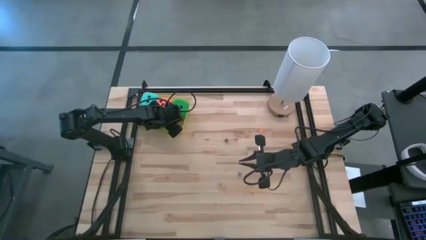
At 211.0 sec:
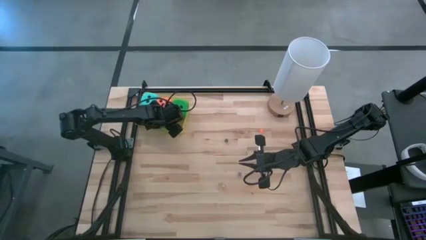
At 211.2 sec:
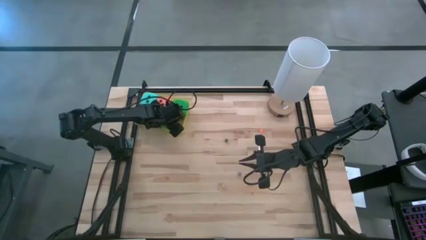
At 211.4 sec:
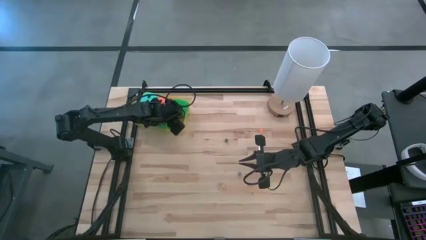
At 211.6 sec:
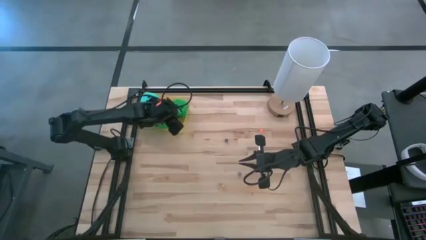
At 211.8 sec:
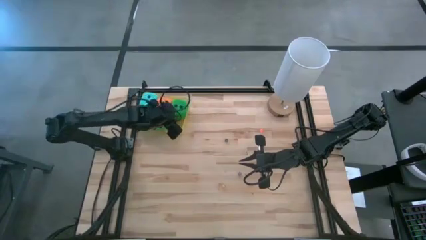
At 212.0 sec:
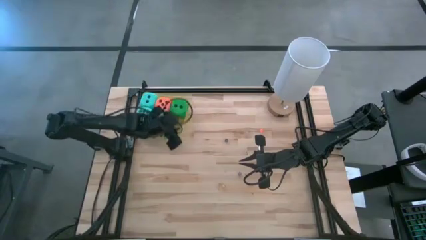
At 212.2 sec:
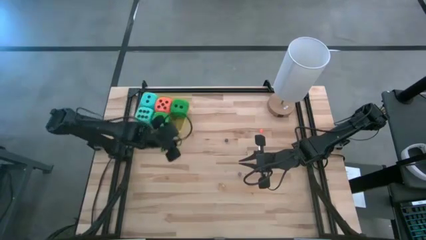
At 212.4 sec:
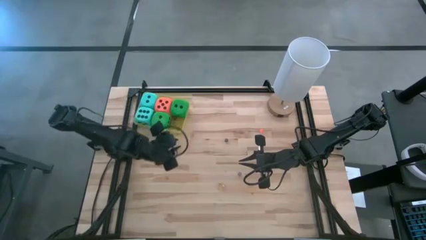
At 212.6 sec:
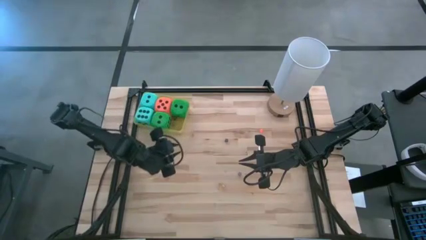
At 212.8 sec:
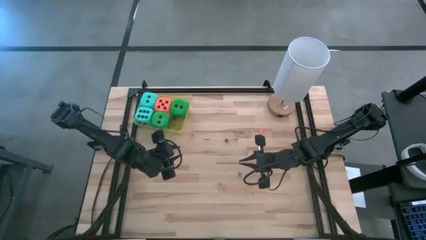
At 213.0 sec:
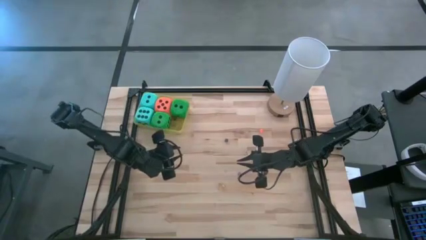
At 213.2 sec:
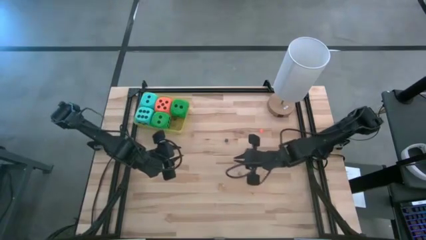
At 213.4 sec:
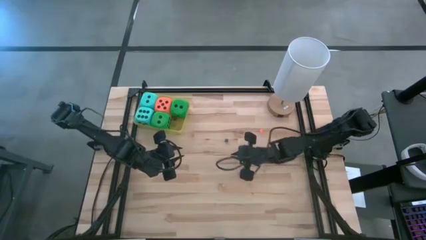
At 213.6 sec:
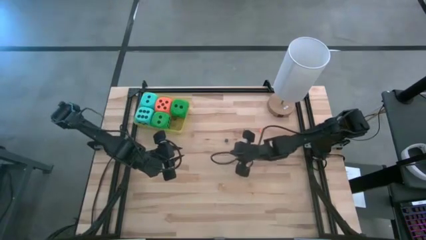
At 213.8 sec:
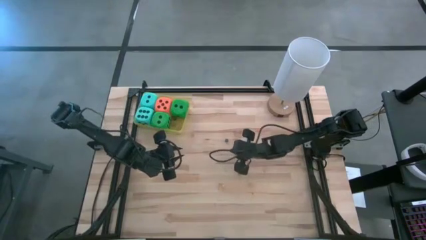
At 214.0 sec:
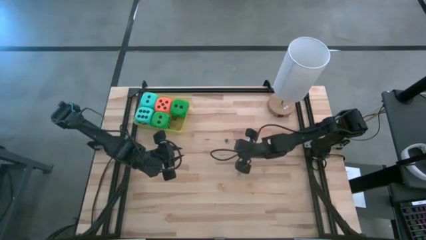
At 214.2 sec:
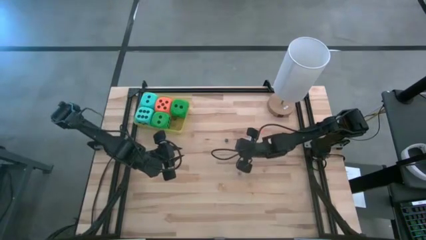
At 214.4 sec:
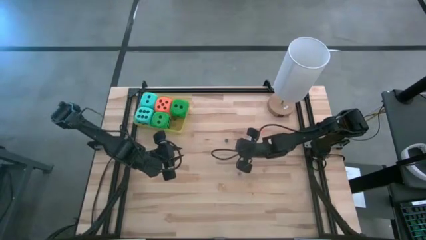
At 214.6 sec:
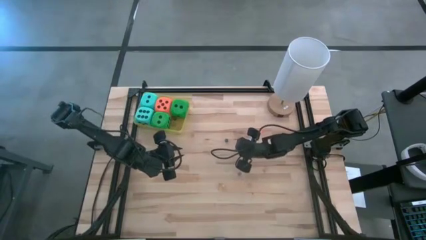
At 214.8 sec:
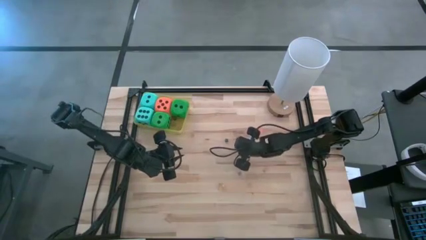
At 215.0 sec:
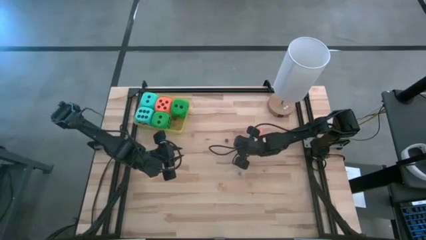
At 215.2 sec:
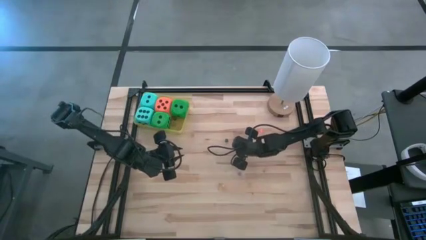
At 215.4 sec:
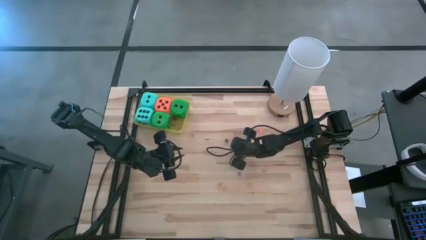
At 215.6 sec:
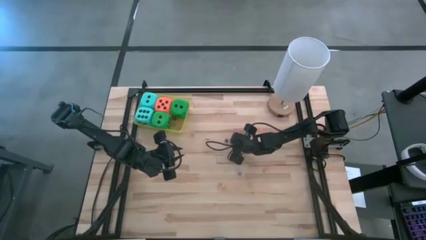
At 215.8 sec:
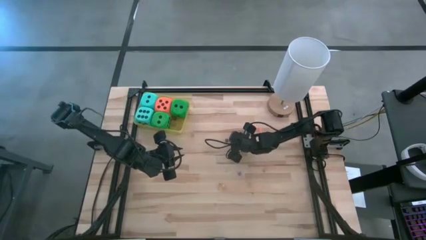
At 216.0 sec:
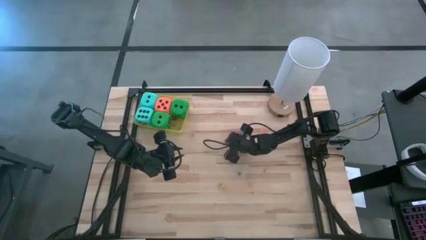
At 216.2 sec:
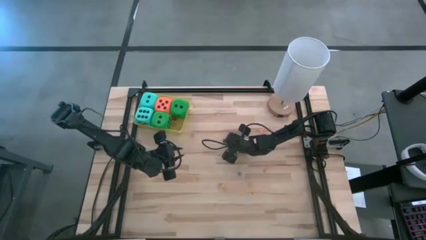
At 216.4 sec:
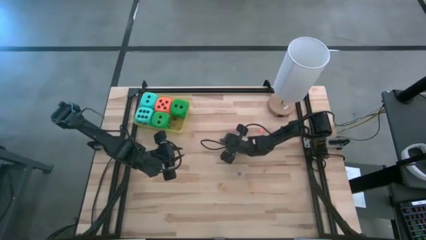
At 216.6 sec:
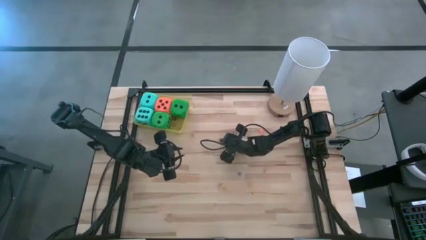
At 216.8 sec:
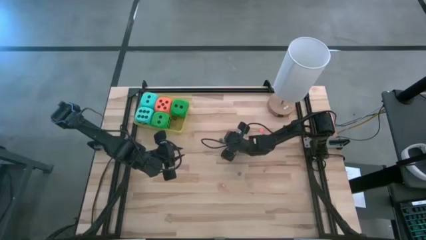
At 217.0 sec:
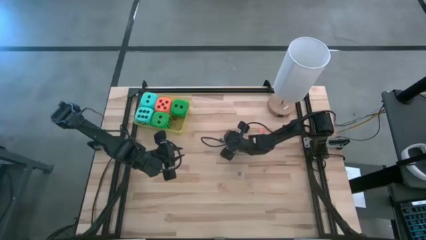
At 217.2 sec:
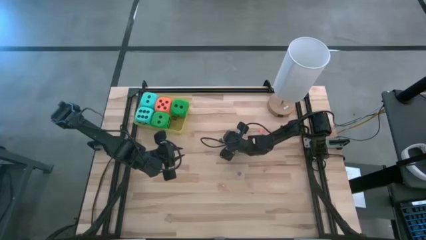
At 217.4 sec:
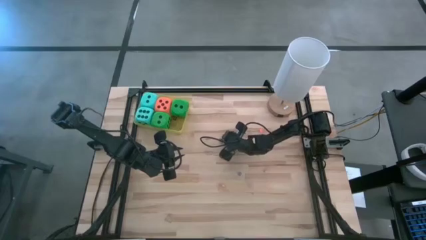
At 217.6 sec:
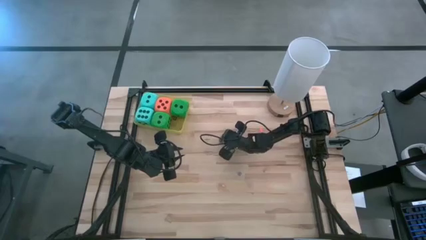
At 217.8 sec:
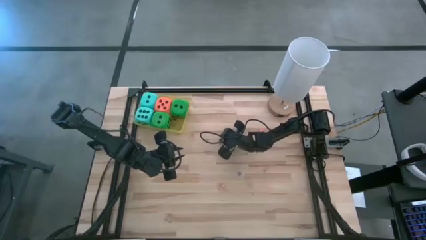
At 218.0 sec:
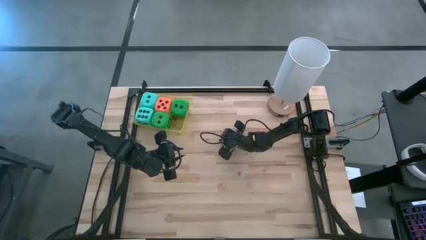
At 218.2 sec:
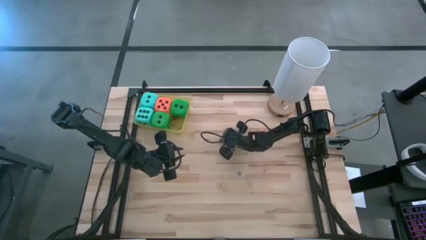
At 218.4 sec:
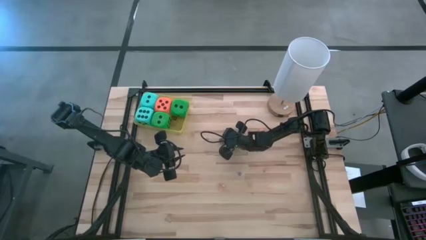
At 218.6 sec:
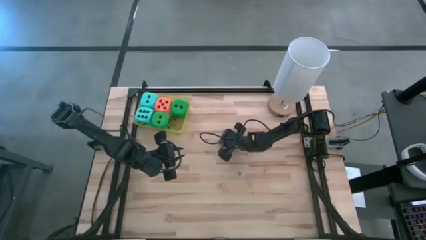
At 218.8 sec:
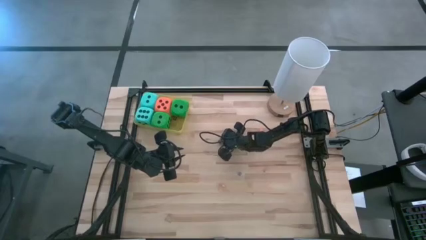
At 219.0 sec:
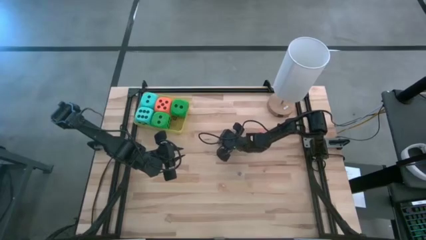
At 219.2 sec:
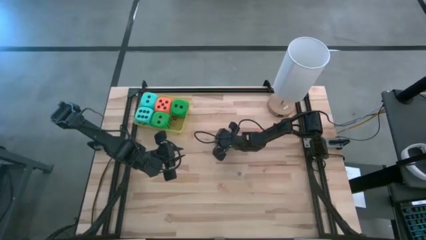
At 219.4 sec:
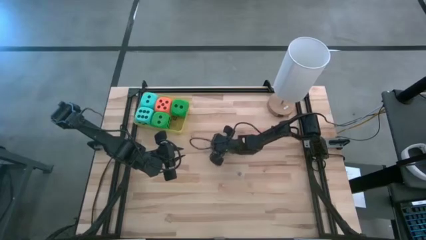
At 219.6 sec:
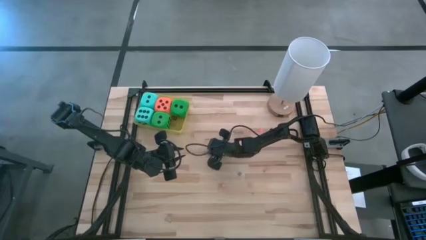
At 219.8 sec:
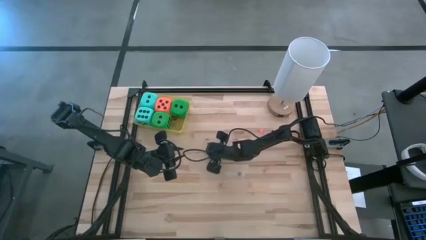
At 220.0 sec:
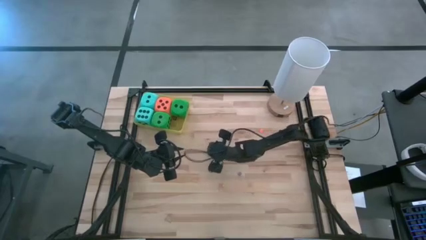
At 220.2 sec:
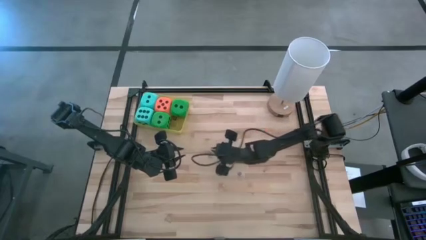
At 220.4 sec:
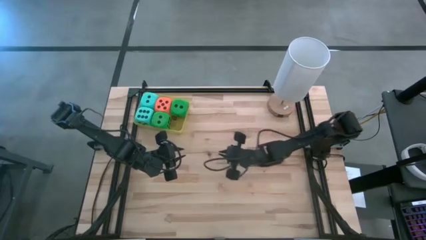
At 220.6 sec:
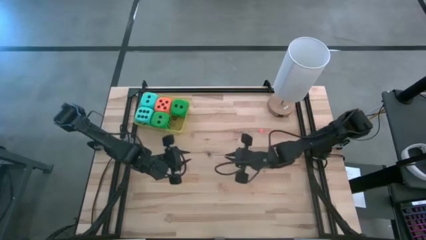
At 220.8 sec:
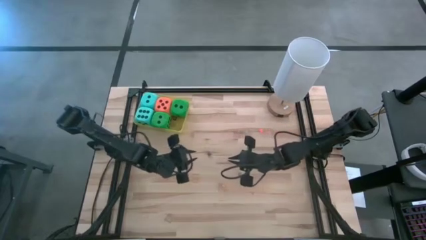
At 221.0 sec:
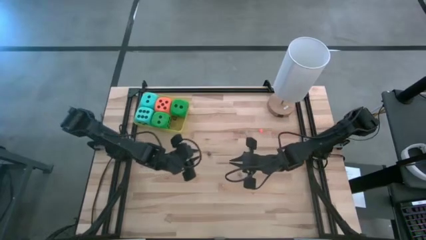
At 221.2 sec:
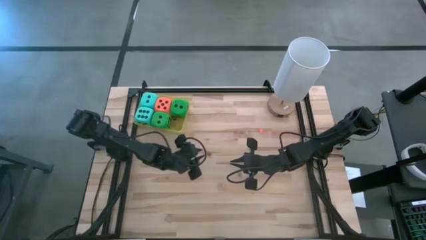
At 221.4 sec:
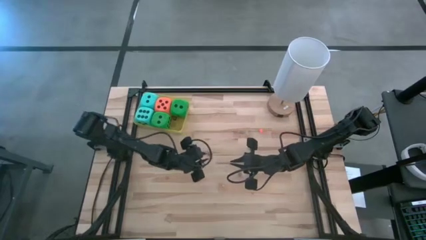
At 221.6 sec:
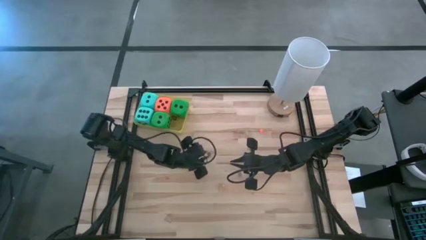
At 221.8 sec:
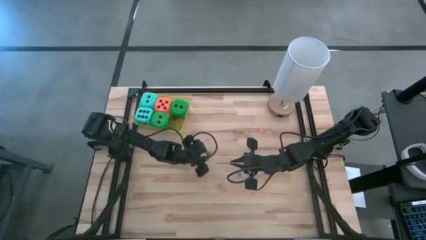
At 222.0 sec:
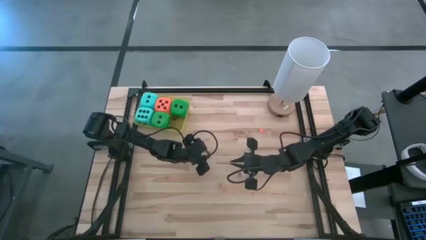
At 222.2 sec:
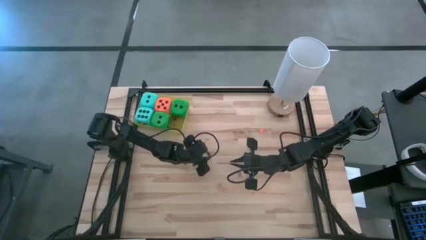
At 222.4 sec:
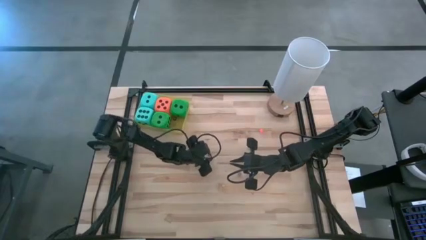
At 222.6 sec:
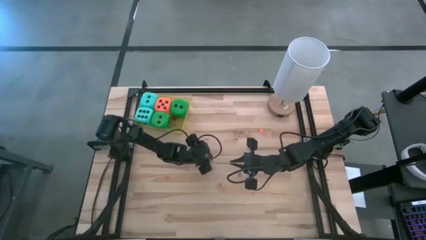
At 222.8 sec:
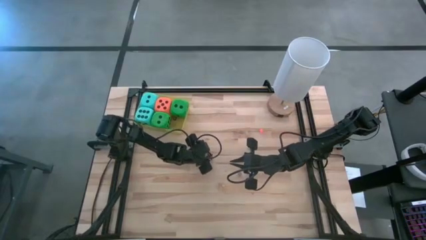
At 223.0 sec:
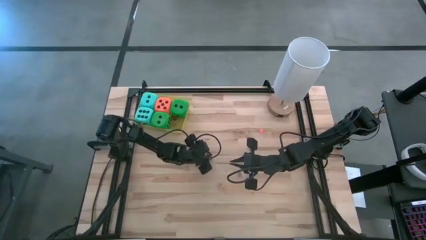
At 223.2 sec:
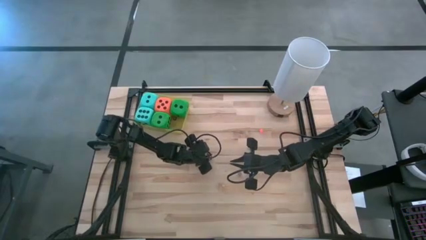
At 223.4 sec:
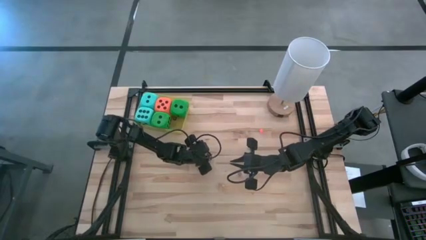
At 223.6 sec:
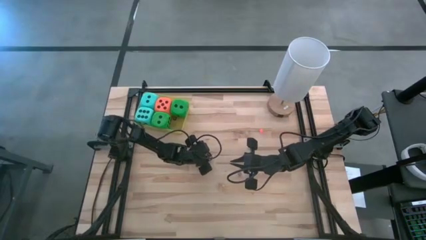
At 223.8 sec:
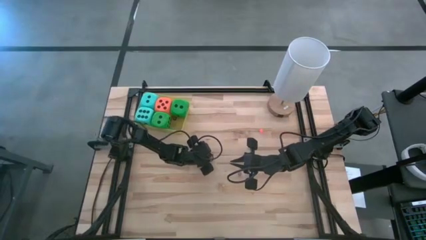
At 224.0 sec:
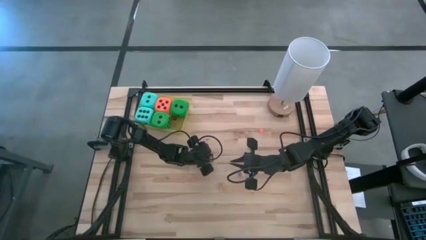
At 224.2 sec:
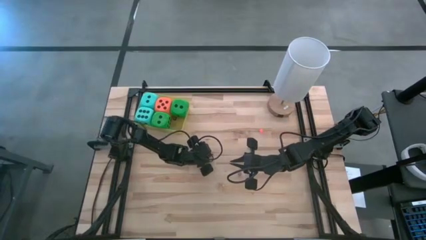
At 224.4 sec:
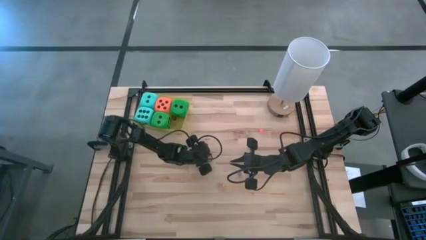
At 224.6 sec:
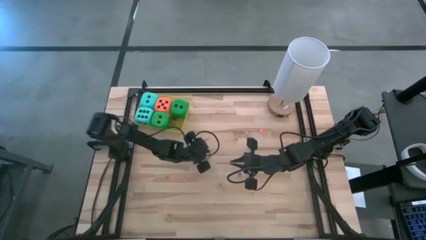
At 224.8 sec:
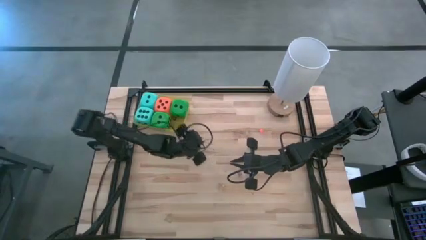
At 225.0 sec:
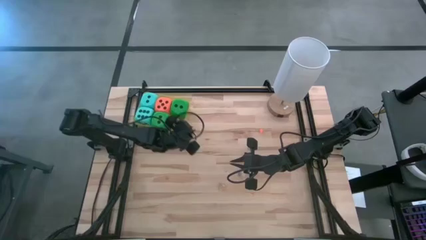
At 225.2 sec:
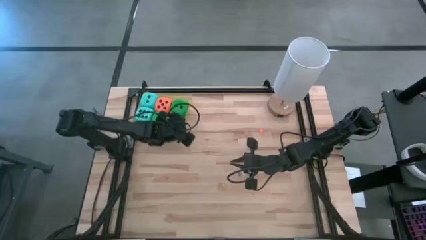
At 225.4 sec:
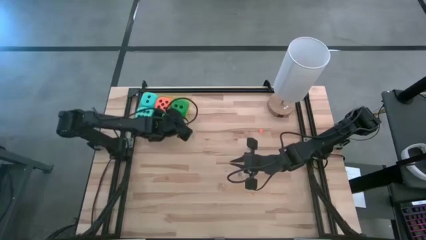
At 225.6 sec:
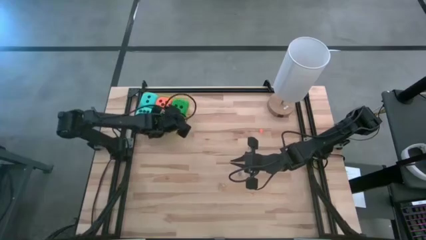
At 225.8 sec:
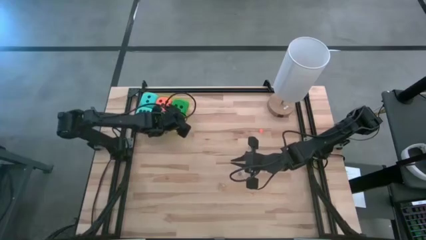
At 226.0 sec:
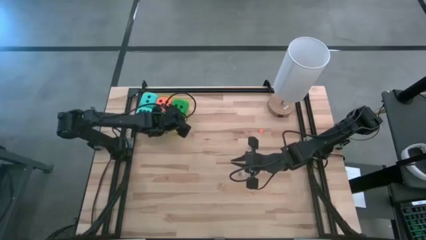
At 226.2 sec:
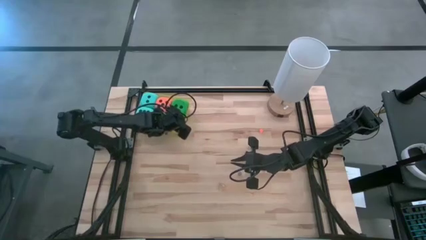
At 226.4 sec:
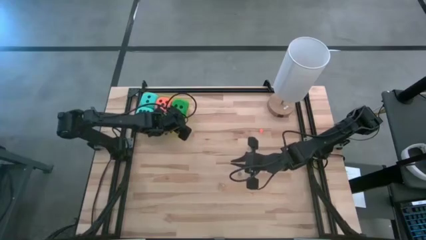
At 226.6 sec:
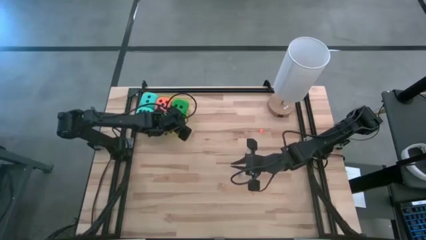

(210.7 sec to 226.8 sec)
Task: Pick & Place Dice
Put the black small die into the yellow container
